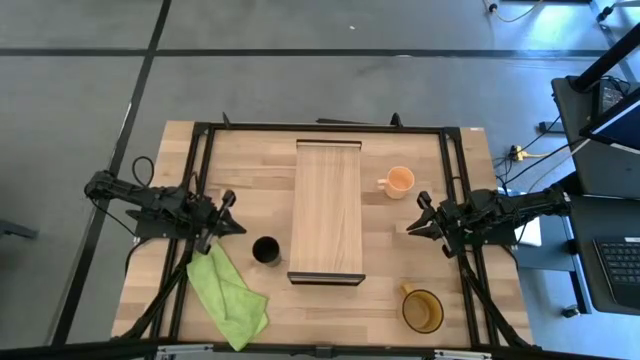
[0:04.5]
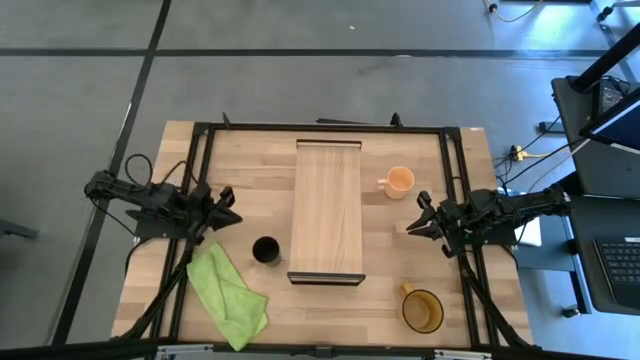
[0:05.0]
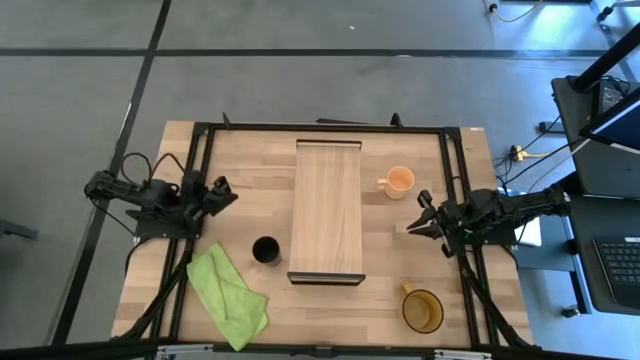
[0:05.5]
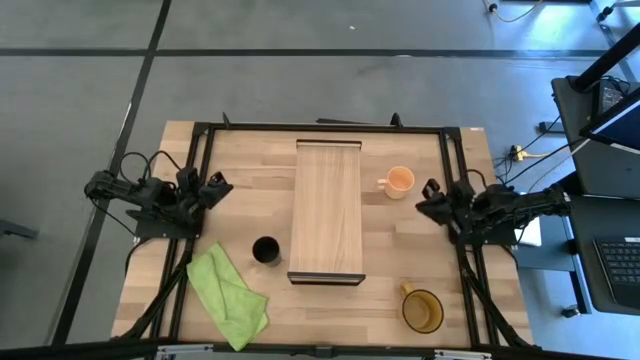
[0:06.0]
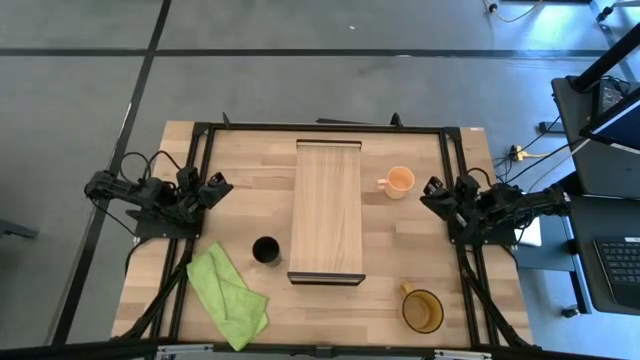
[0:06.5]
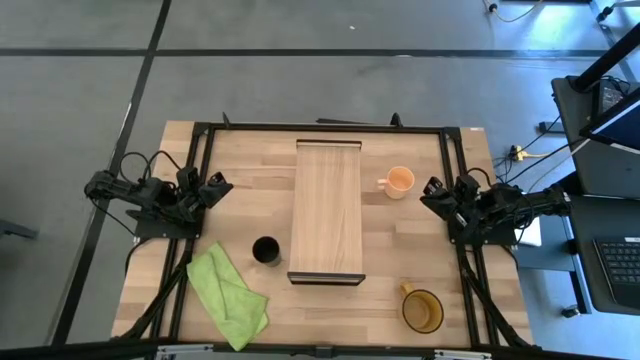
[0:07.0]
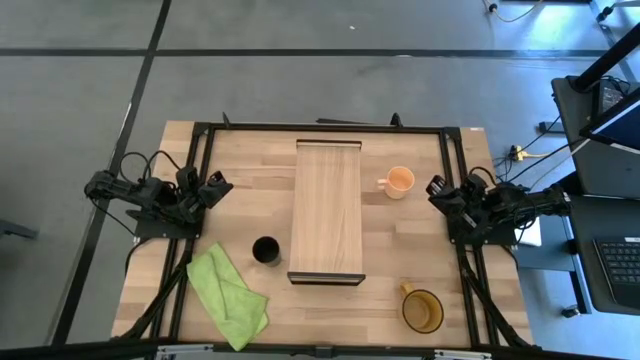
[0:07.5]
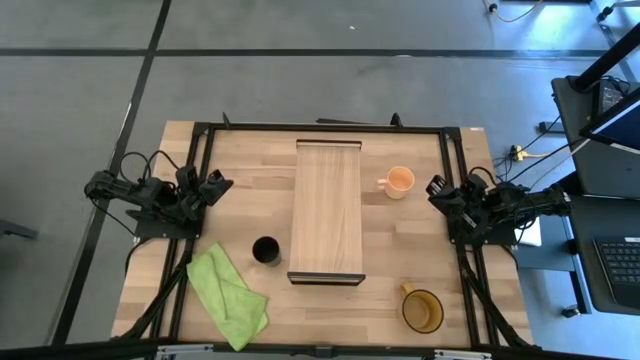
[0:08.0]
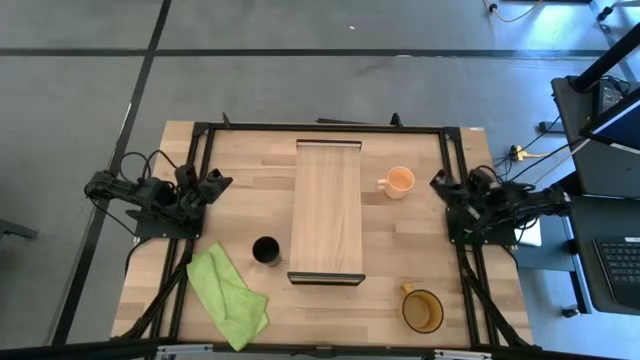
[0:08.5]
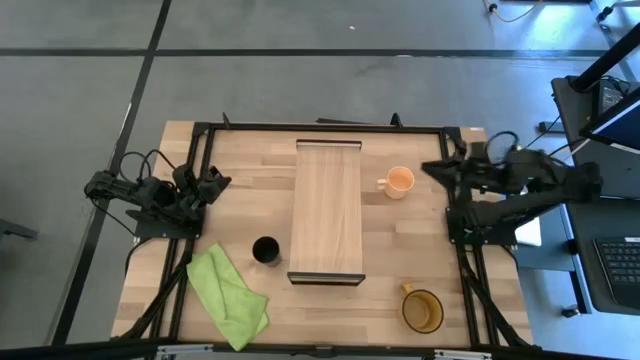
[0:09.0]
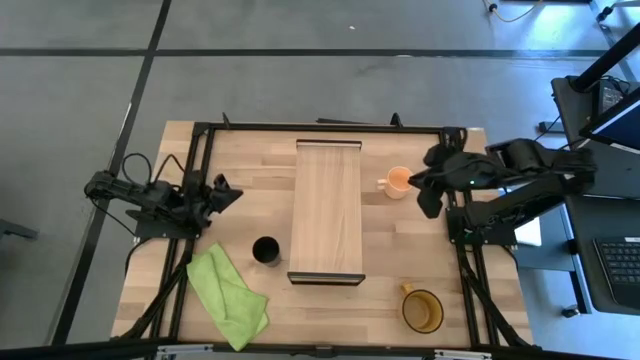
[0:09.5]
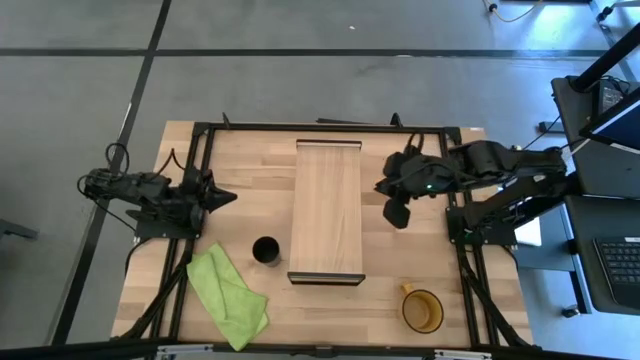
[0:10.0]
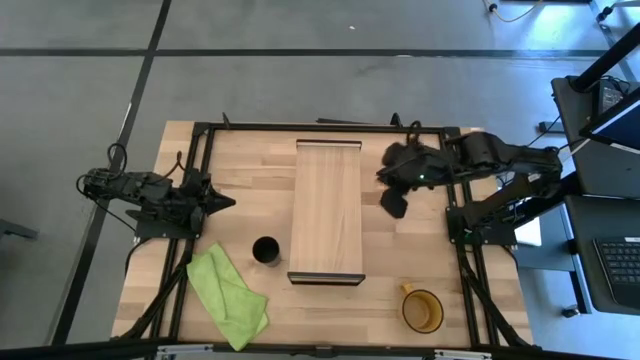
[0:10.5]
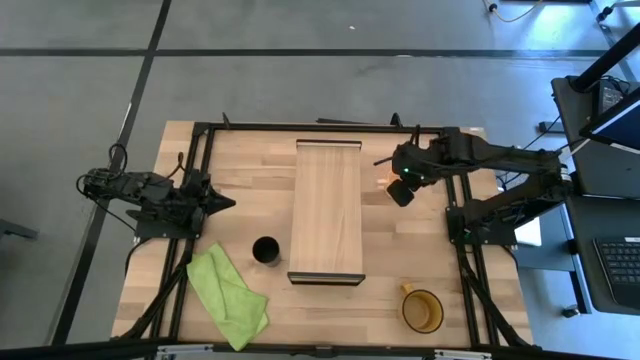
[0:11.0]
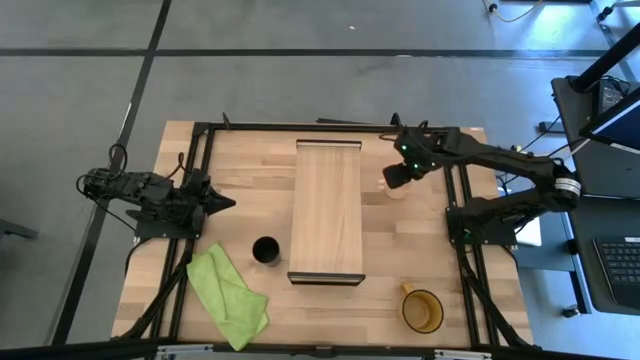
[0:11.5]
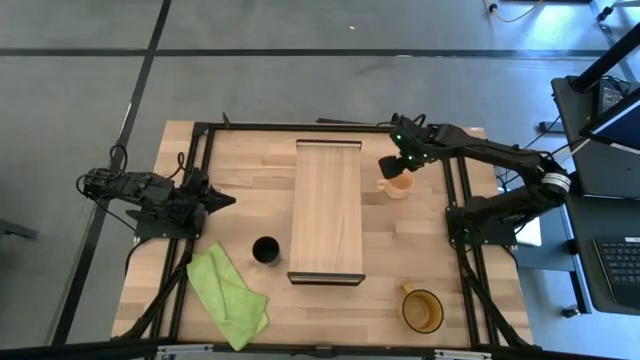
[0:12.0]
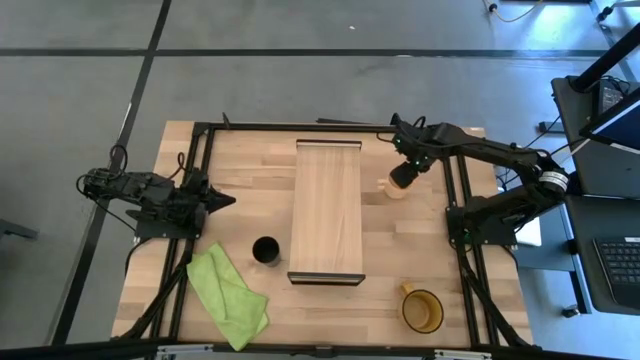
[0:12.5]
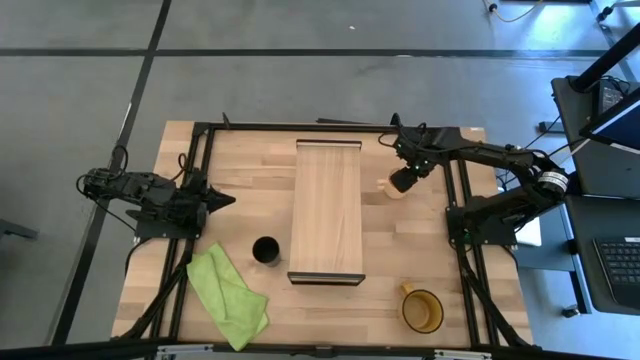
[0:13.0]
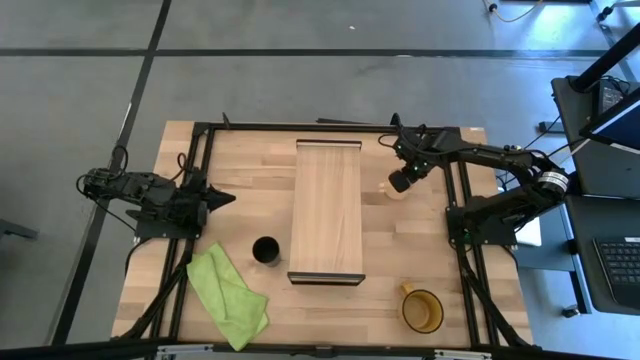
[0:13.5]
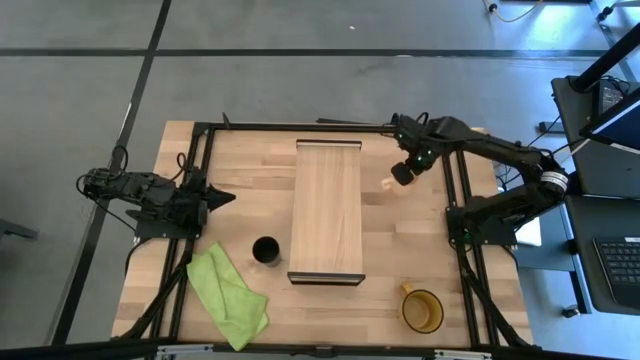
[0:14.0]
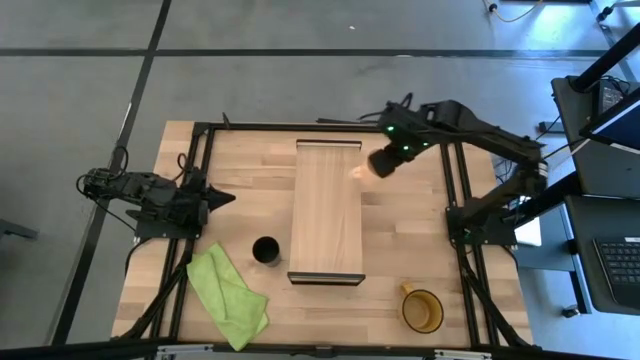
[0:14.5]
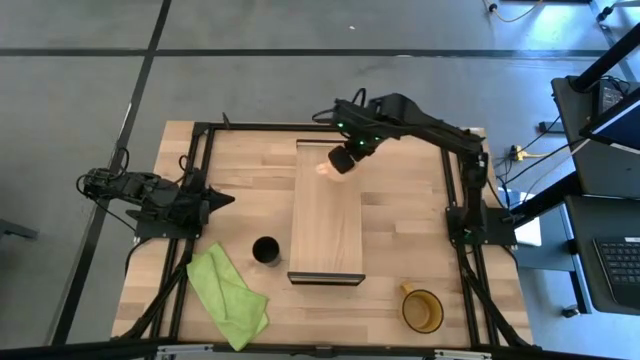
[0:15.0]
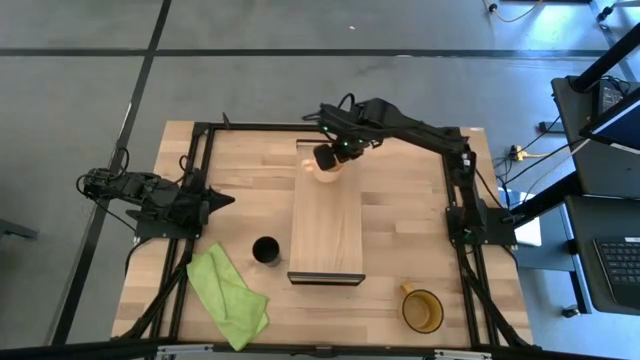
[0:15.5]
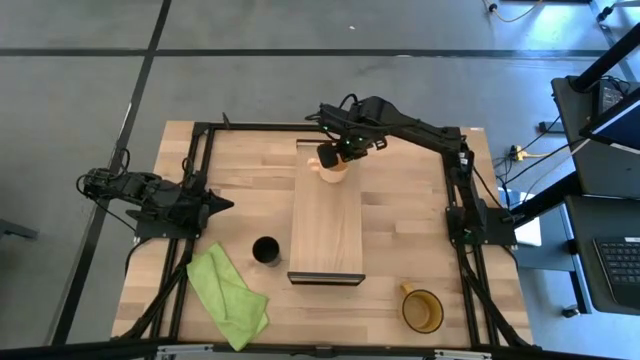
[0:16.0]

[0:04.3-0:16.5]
Task: Stack small to large cups/mugs on shelf
Put the beige cup on the shelf

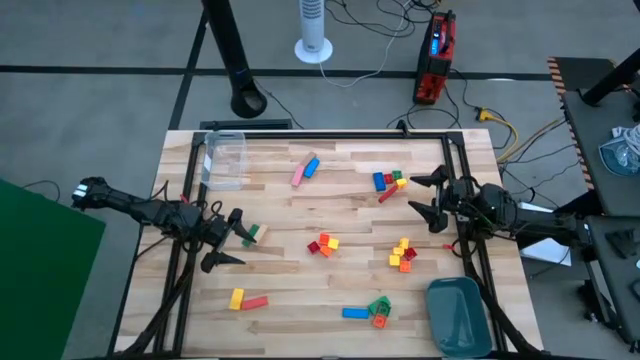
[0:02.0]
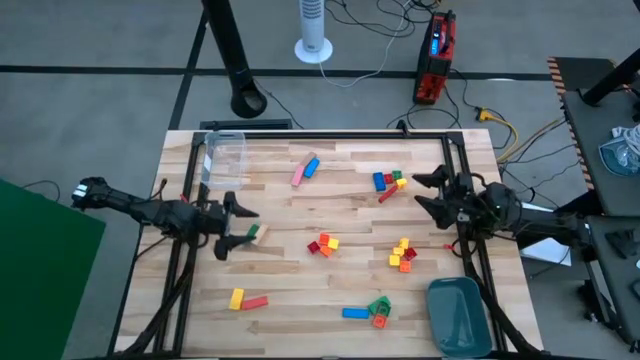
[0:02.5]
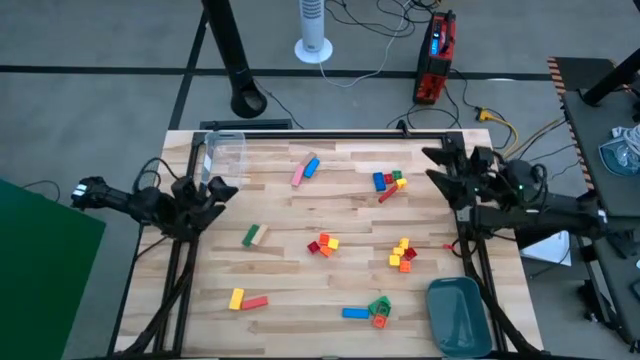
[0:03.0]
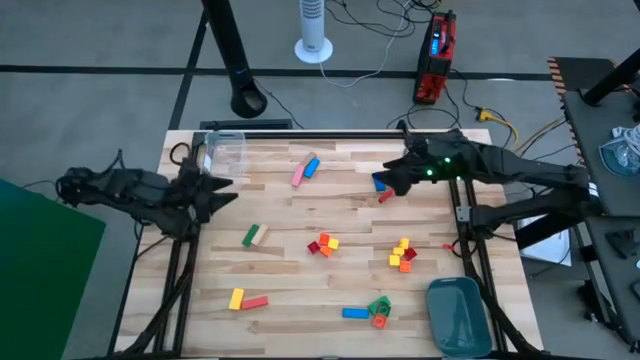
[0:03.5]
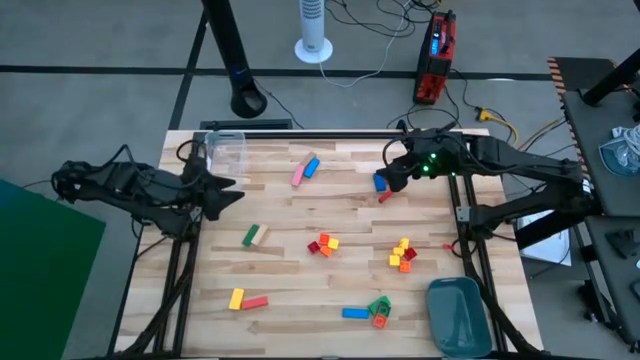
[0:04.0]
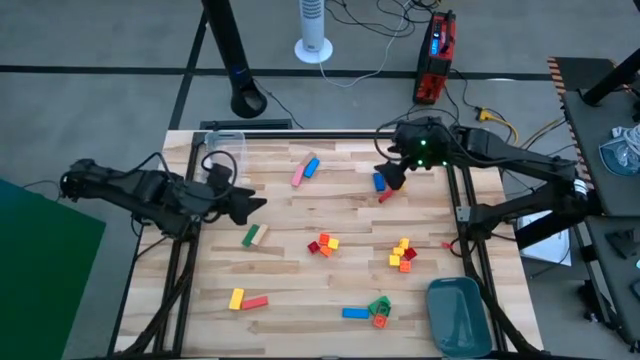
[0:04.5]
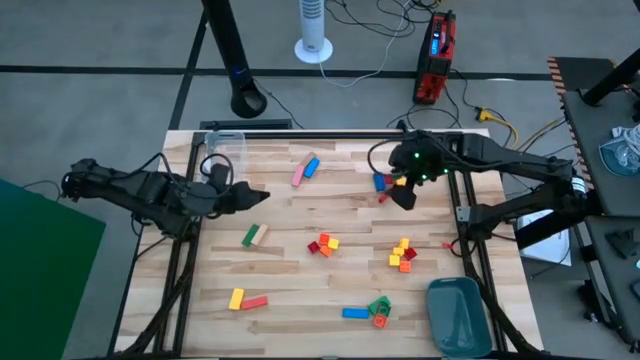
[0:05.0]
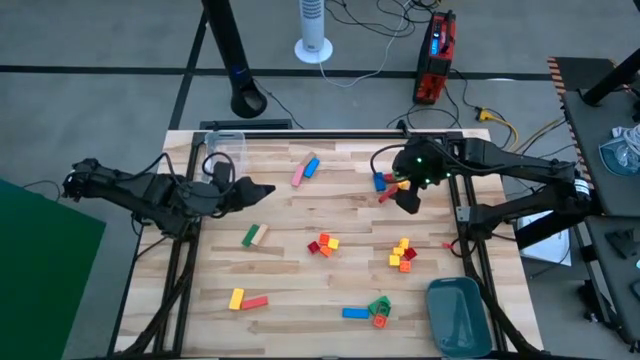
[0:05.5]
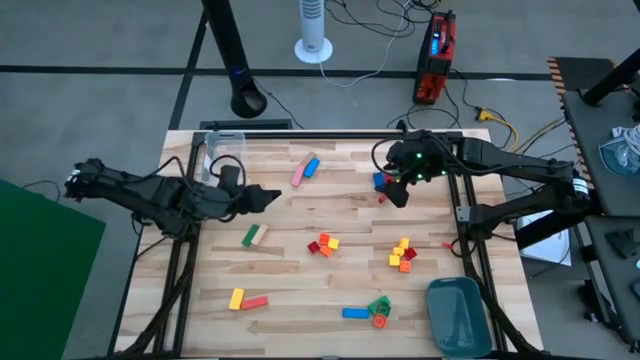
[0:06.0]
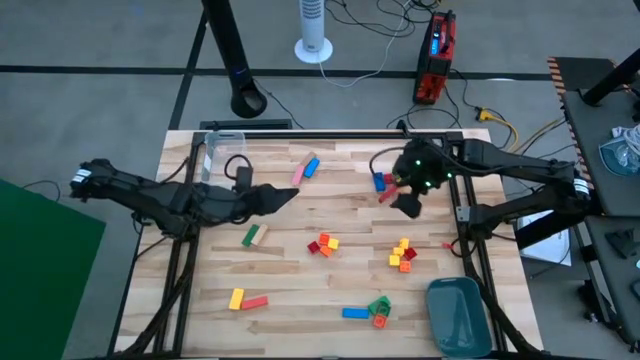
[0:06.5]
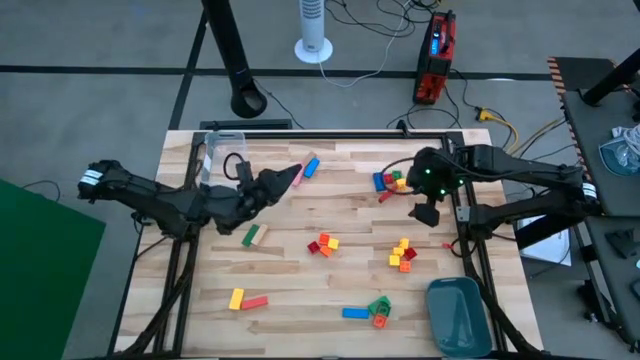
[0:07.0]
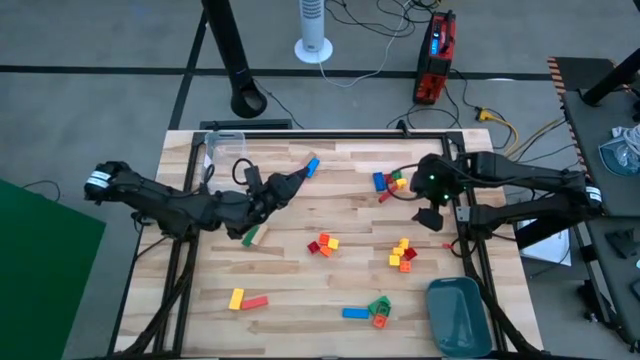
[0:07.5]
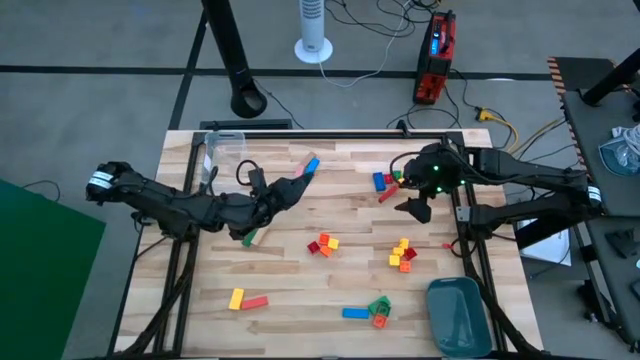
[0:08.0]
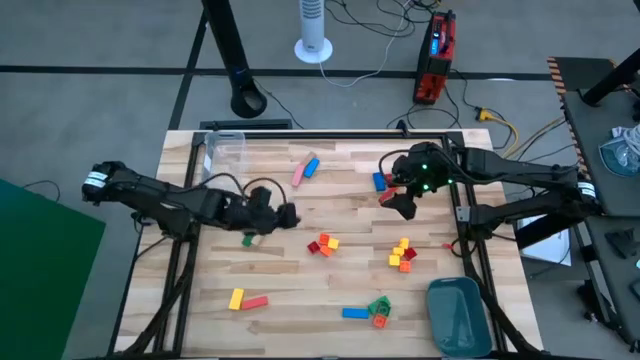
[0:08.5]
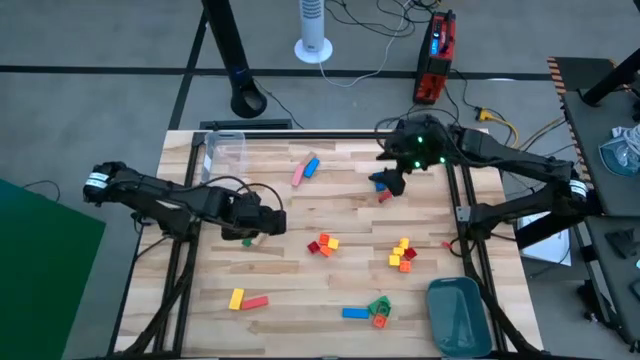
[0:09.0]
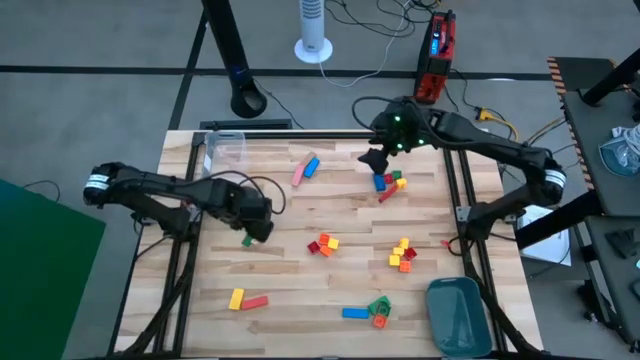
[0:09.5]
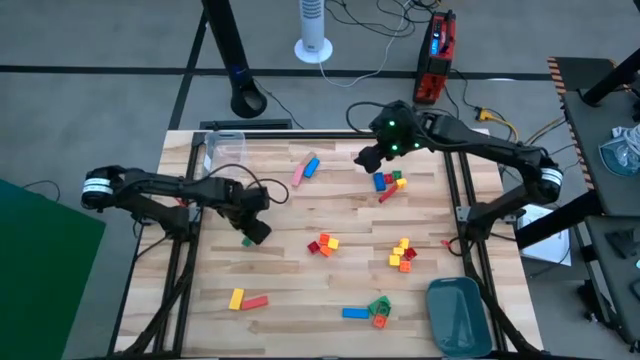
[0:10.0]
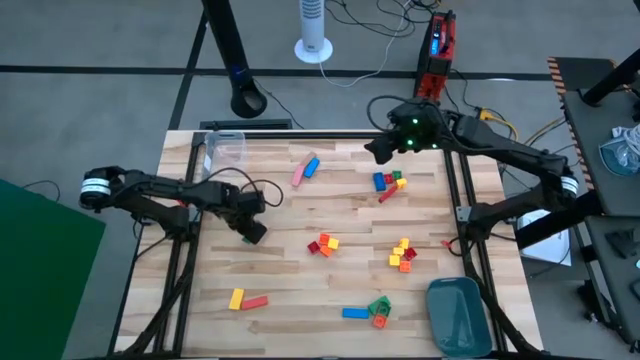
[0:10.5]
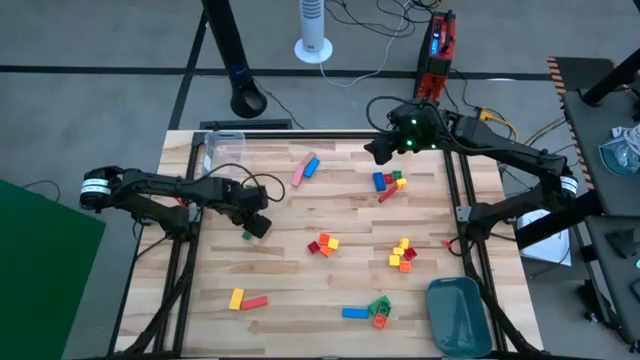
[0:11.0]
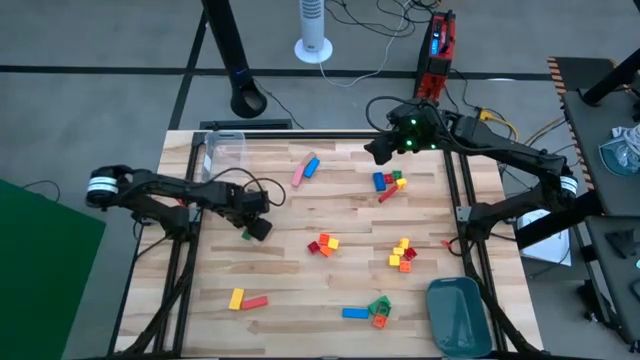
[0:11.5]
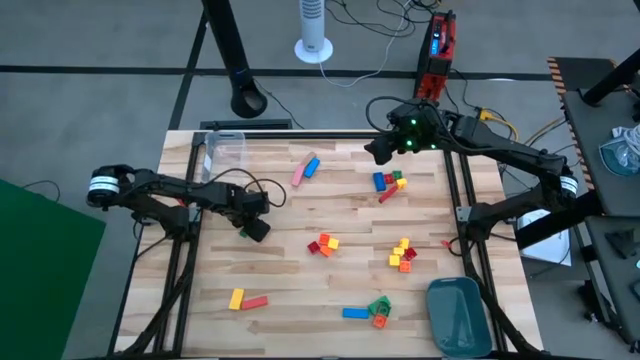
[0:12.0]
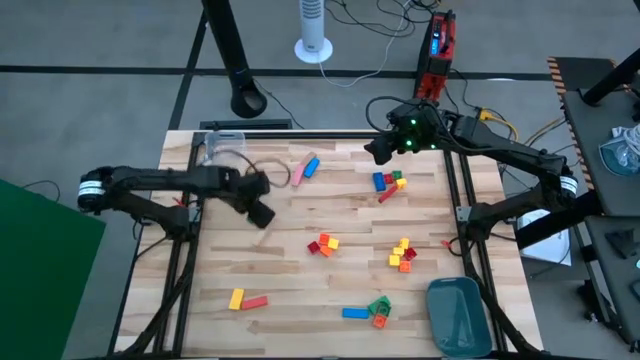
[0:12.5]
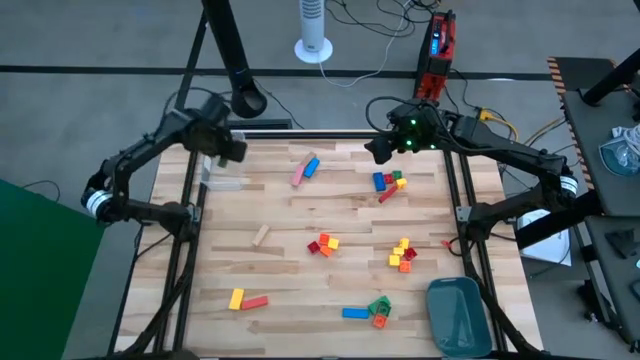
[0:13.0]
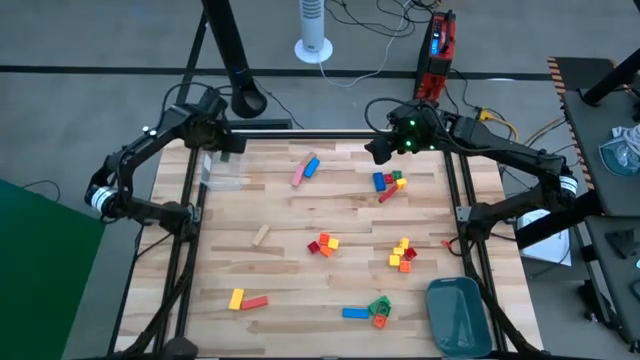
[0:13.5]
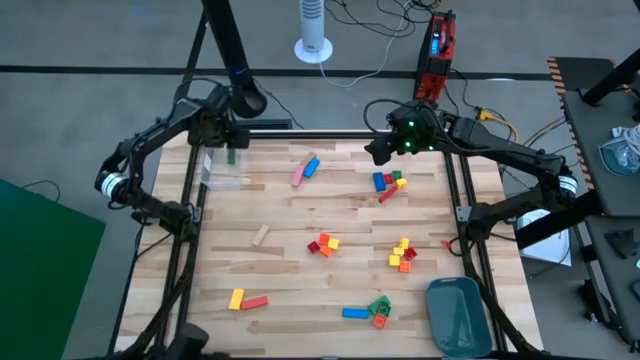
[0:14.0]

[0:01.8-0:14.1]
Task: Sort blocks by size
Put the green rectangular wooden block into the transparent bin
